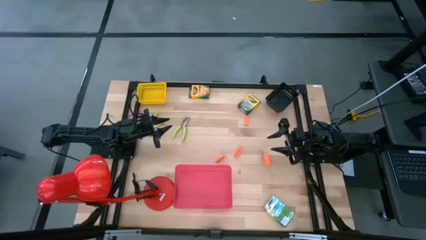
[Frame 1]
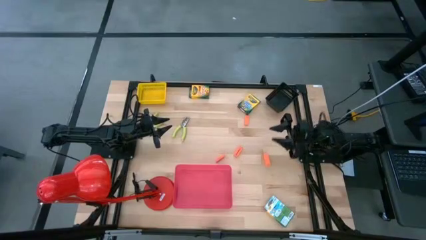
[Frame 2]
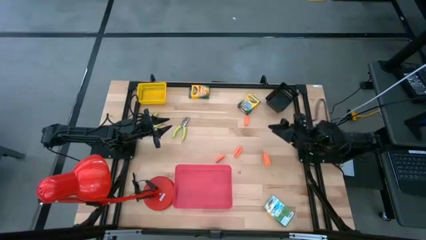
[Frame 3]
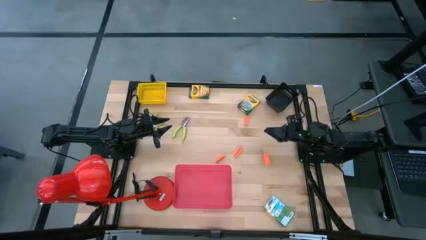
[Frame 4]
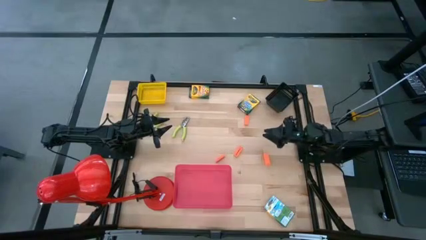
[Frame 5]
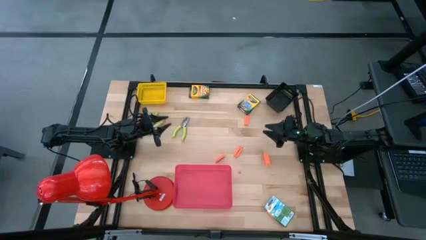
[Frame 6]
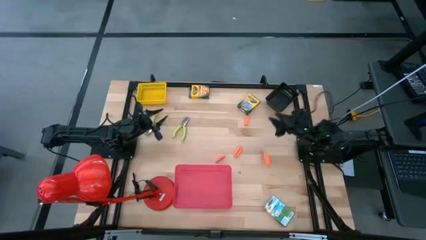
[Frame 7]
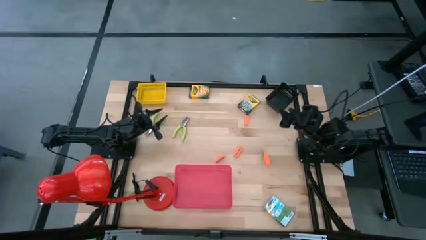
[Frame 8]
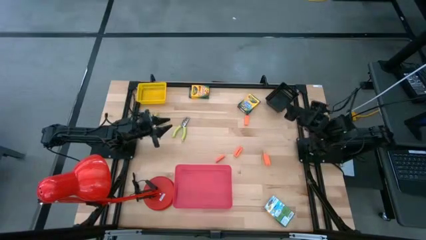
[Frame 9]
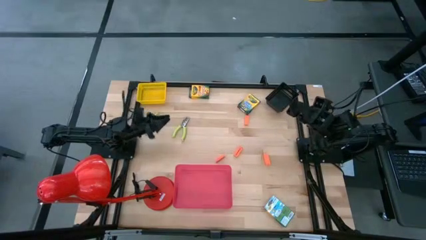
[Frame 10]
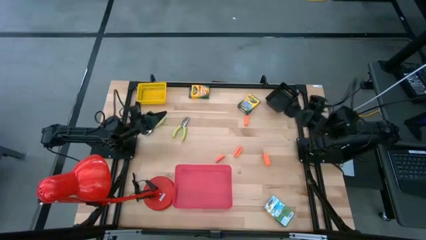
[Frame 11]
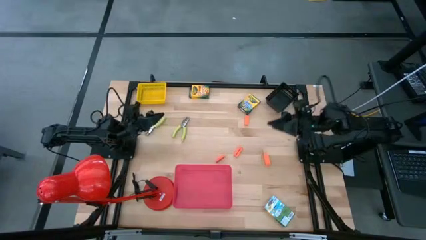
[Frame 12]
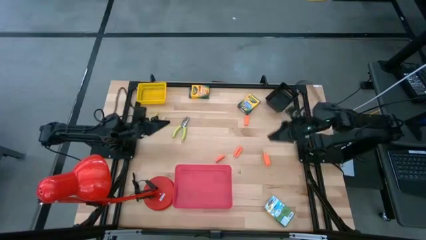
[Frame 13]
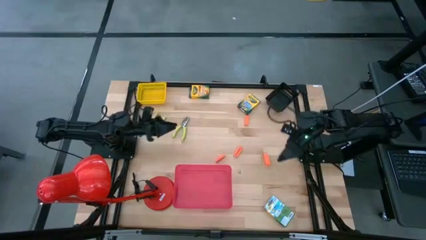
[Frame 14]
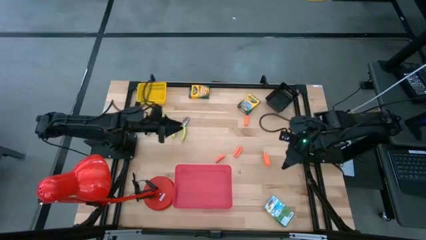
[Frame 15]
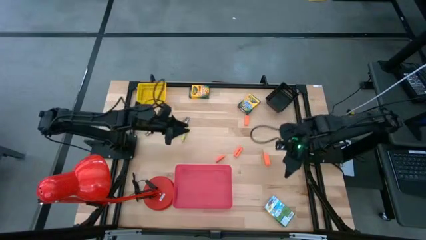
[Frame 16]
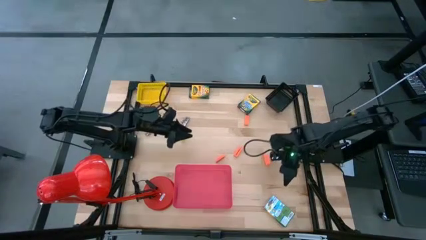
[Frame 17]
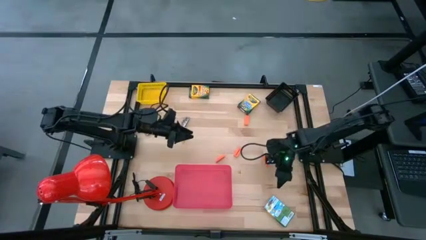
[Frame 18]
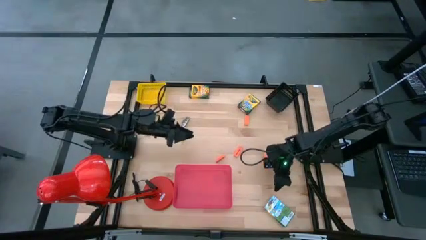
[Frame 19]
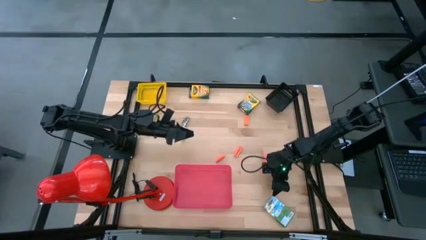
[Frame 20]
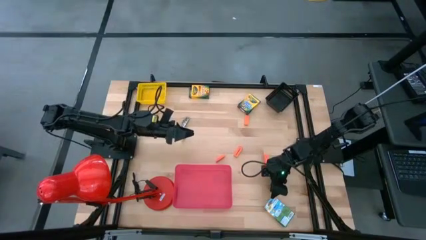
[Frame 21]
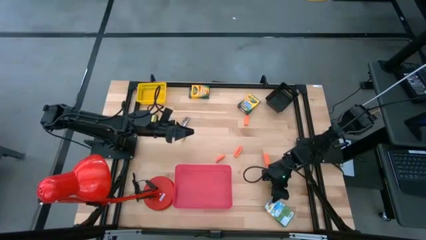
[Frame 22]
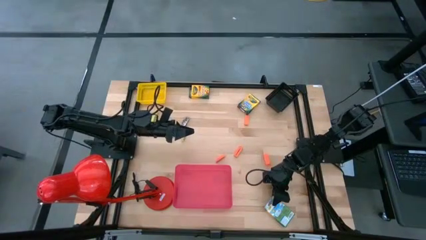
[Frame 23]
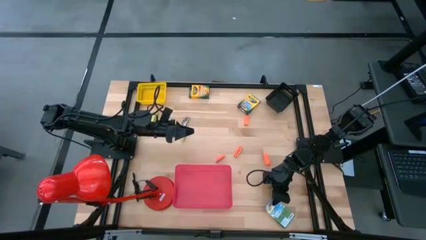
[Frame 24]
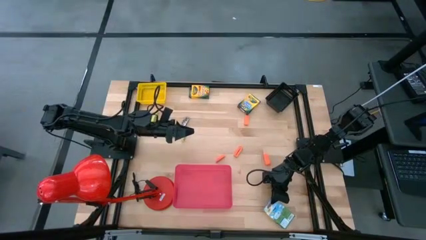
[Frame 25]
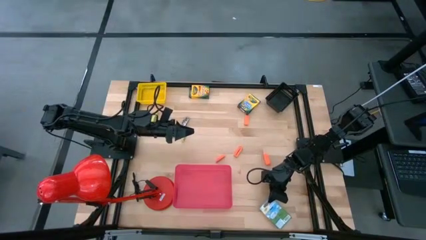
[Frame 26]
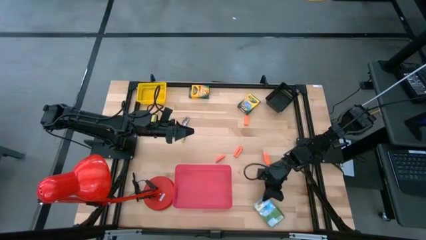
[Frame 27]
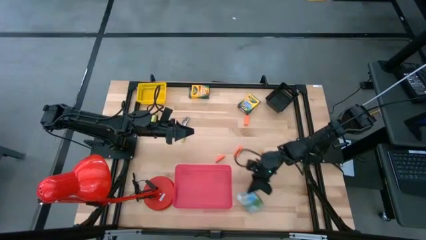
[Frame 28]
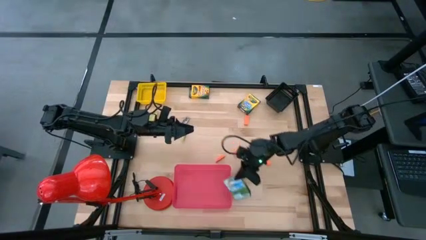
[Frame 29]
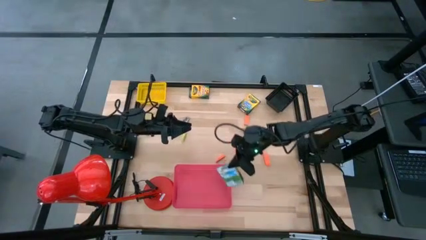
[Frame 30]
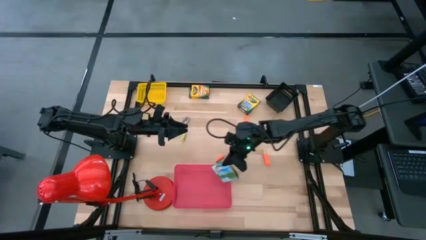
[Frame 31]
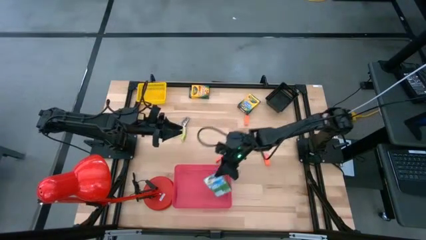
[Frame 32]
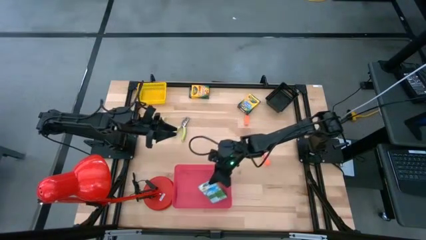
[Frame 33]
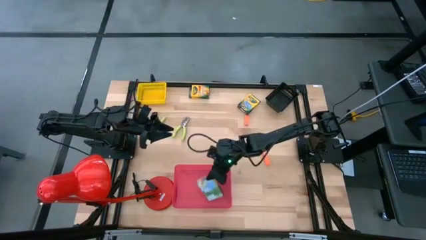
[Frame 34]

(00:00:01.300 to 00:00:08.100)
Task: Pick & Place School Supplies
Put the yellow crayon box into the pink bin

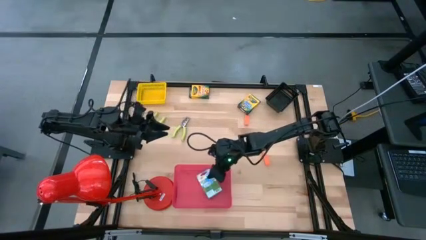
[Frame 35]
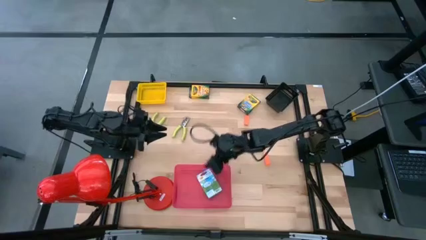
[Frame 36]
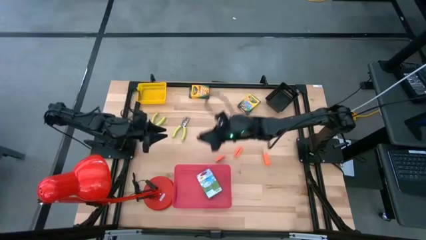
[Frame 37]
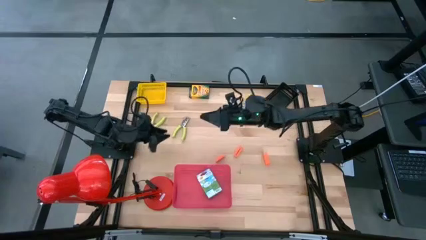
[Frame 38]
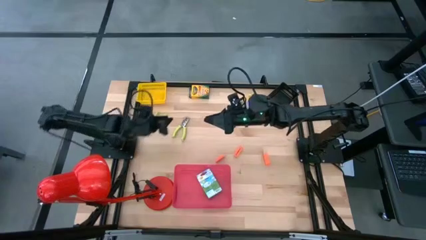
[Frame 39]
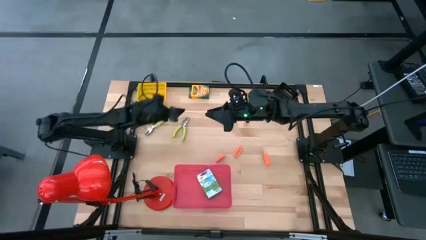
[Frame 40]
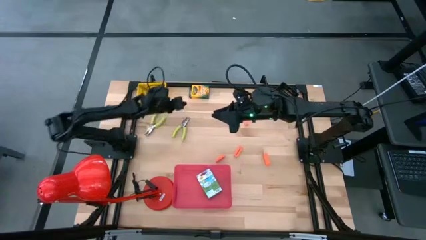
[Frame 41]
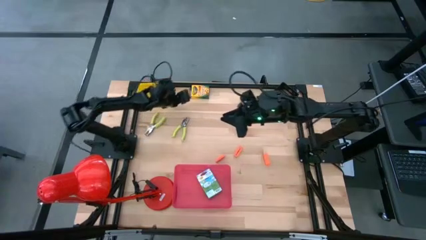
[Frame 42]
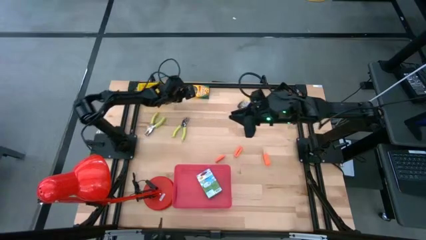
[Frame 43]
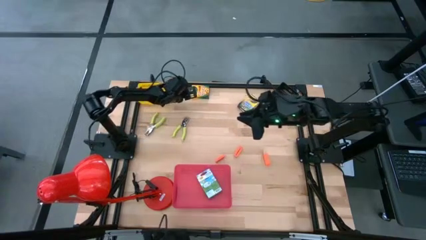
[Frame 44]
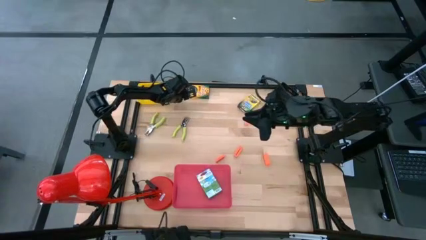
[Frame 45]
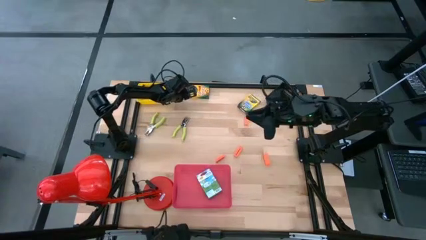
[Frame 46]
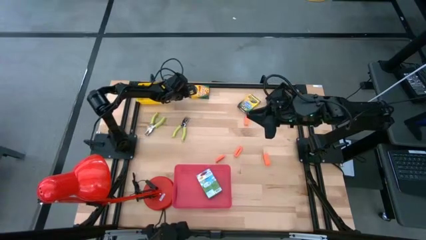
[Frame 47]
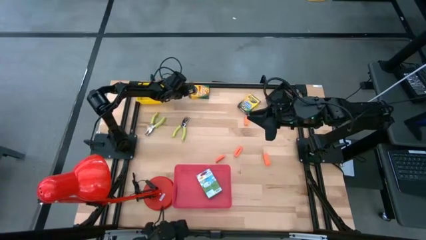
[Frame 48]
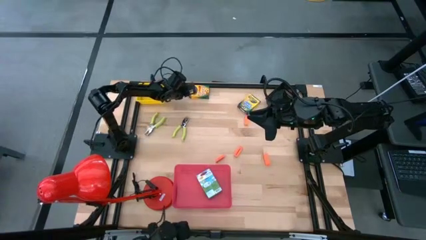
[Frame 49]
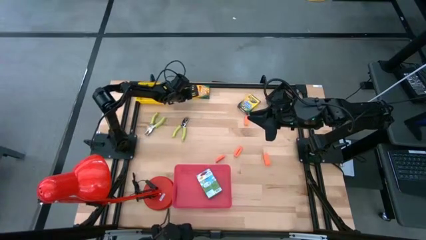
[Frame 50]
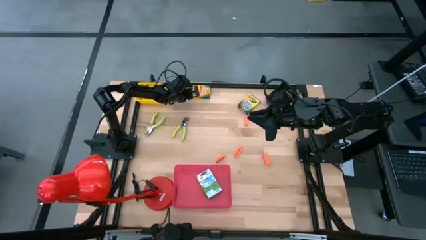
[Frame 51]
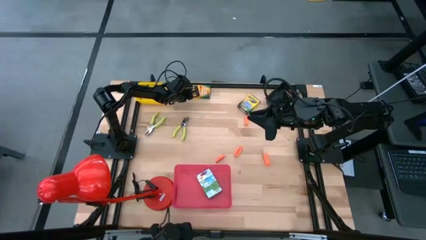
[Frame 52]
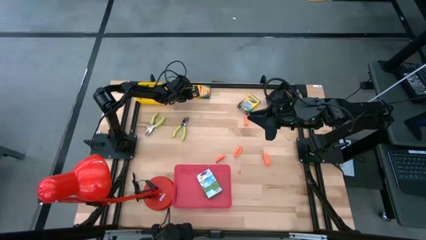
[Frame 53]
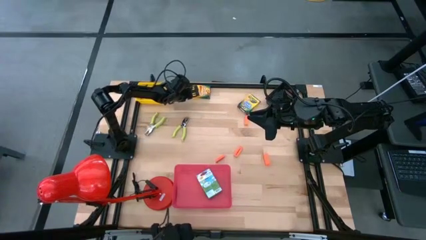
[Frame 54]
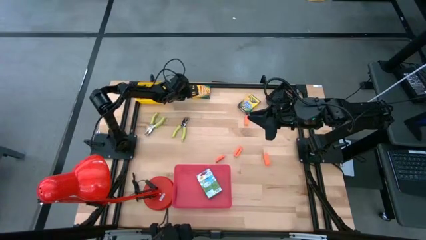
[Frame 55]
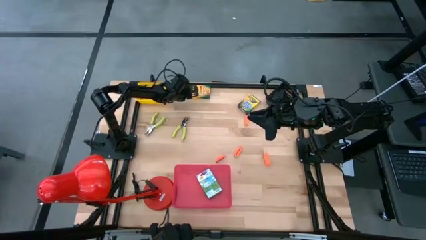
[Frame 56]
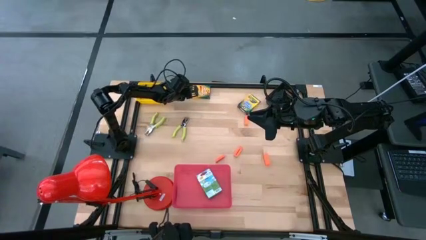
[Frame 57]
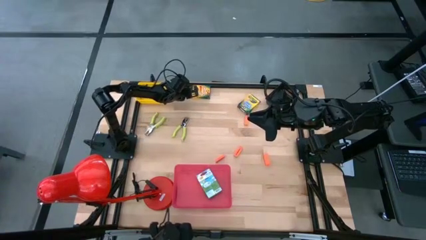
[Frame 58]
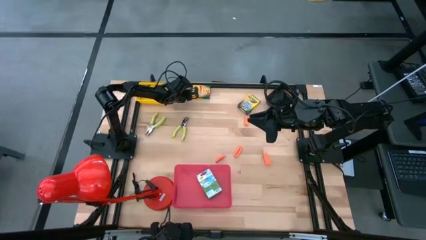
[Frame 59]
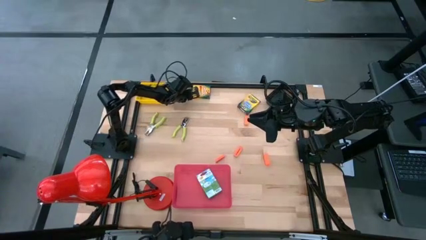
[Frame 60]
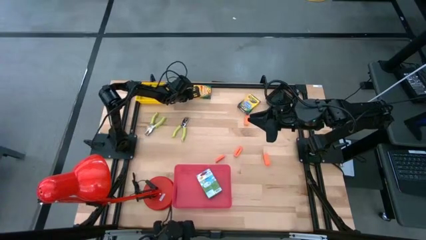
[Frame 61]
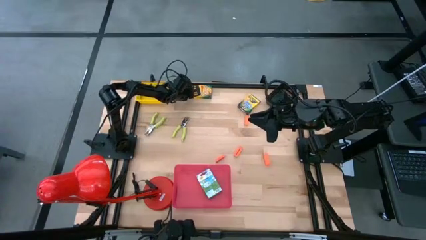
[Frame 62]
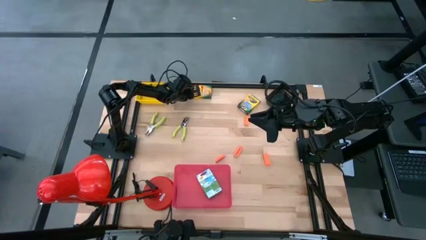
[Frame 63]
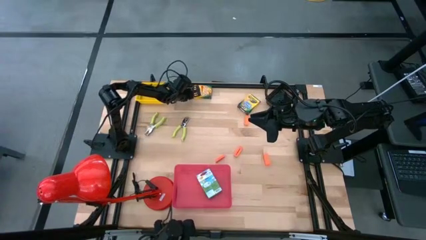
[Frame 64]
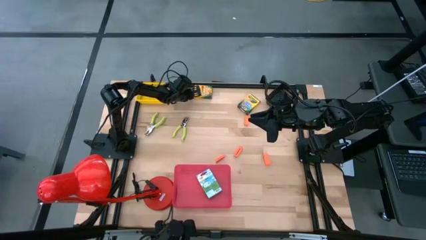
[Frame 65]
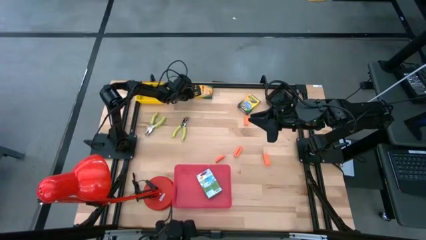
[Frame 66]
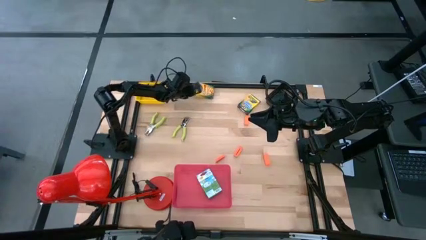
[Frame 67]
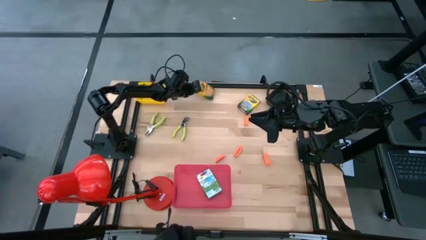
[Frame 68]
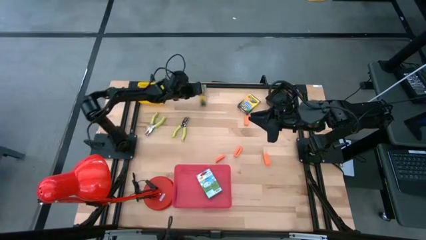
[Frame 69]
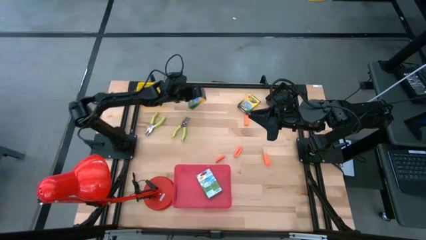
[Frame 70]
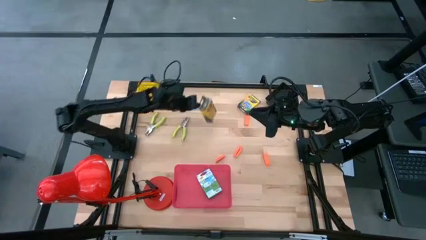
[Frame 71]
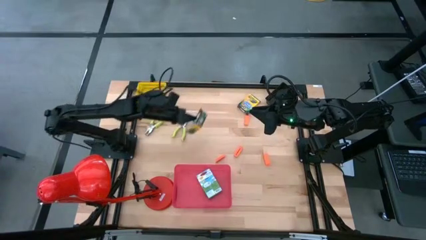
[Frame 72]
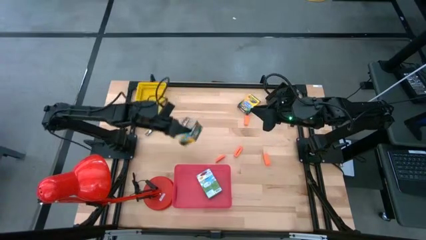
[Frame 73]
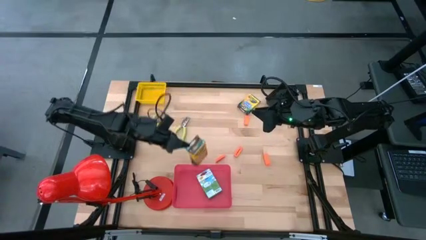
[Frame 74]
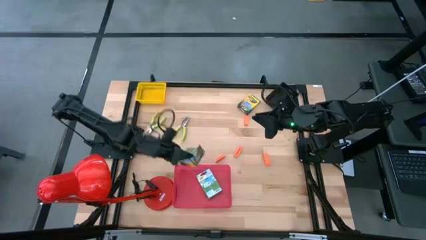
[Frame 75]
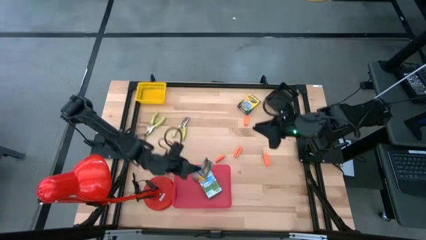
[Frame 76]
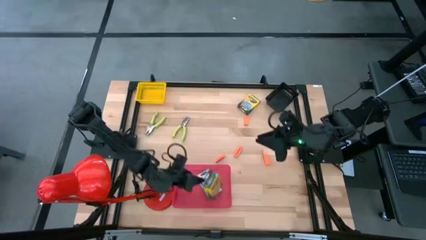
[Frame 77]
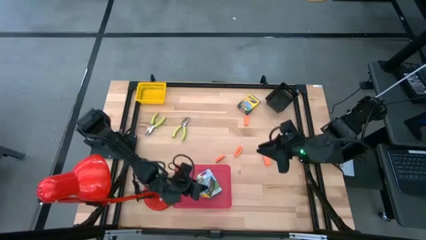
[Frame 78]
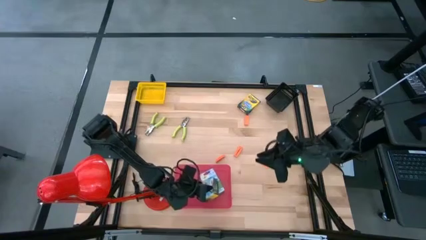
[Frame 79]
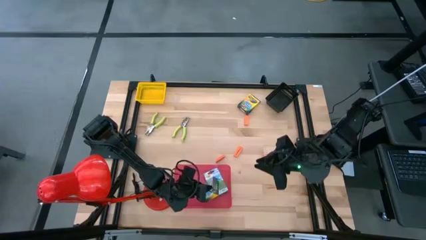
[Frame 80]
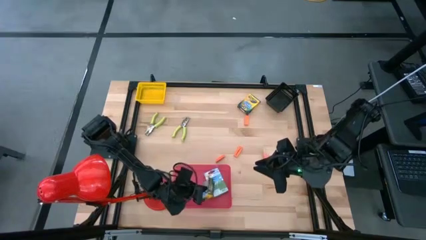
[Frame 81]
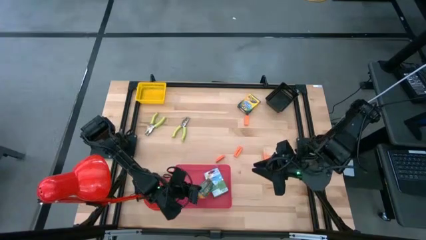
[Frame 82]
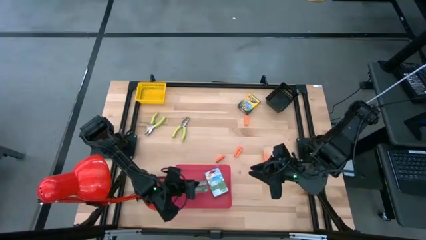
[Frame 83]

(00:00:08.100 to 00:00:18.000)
Put the yellow crayon box into the pink bin
